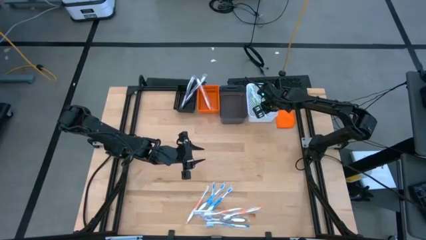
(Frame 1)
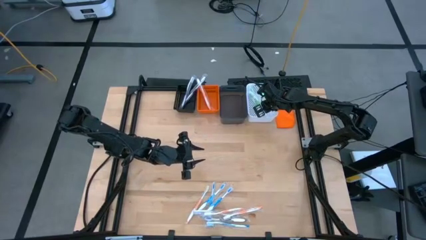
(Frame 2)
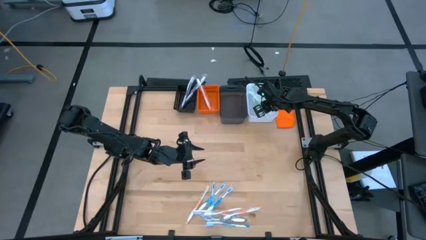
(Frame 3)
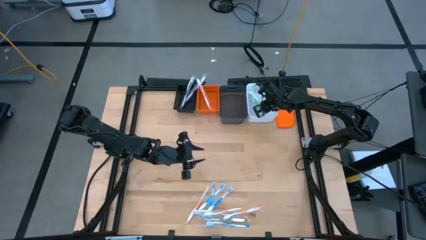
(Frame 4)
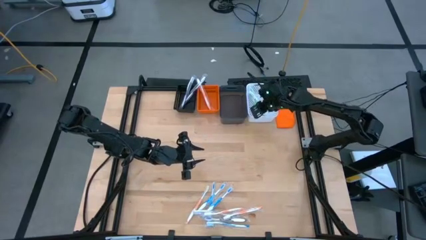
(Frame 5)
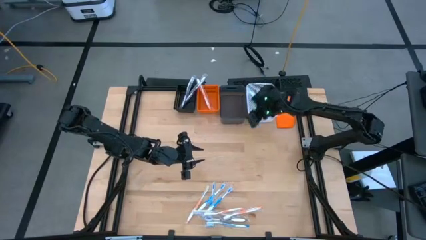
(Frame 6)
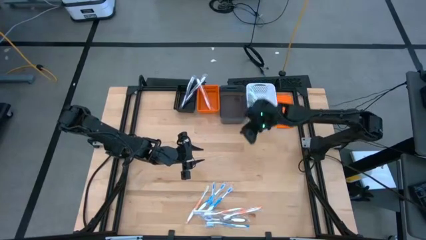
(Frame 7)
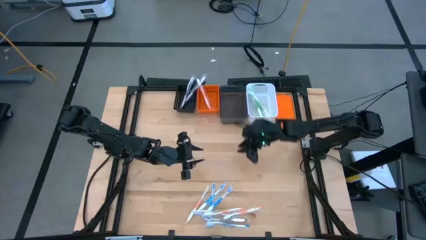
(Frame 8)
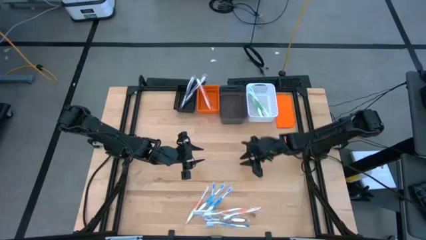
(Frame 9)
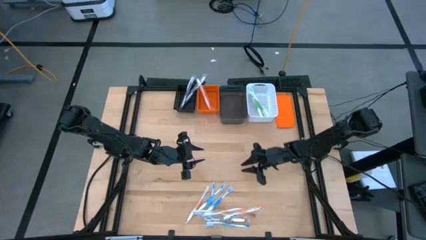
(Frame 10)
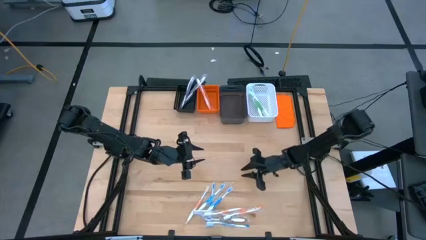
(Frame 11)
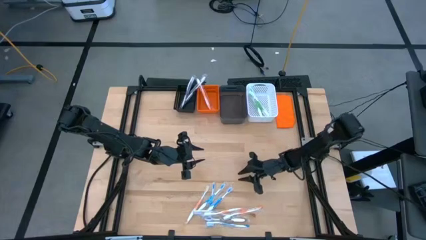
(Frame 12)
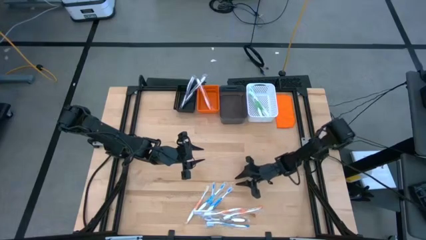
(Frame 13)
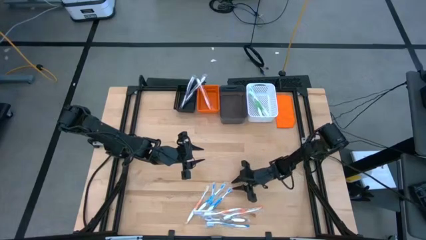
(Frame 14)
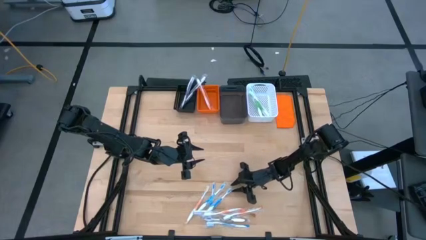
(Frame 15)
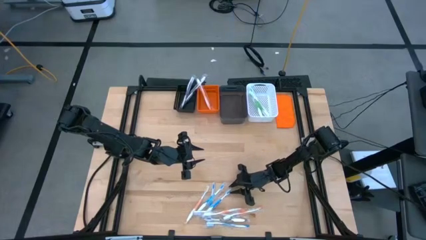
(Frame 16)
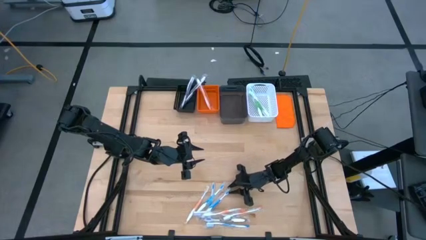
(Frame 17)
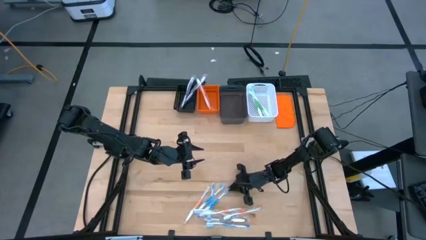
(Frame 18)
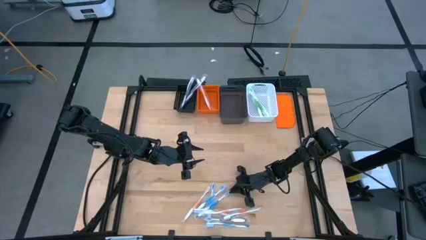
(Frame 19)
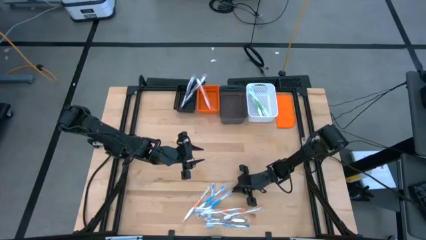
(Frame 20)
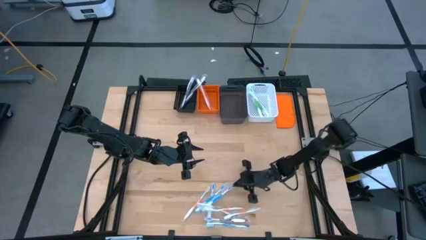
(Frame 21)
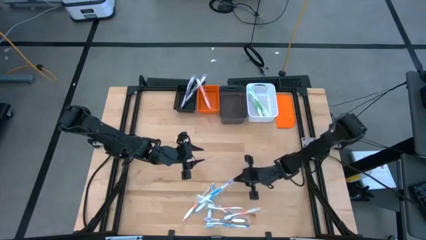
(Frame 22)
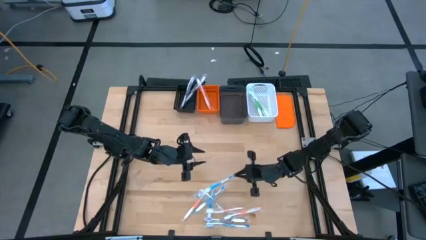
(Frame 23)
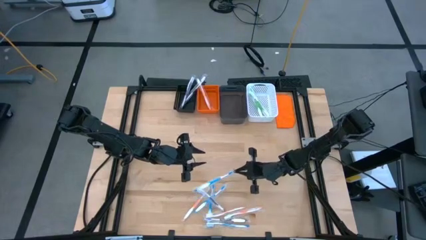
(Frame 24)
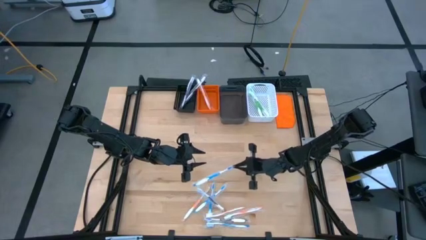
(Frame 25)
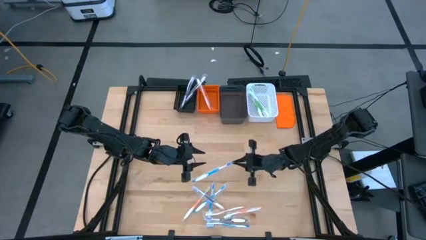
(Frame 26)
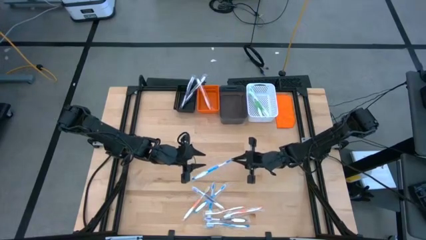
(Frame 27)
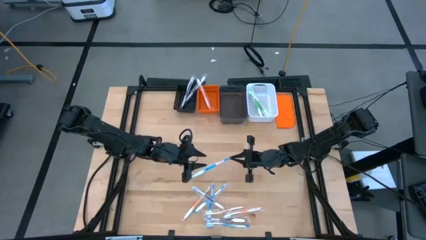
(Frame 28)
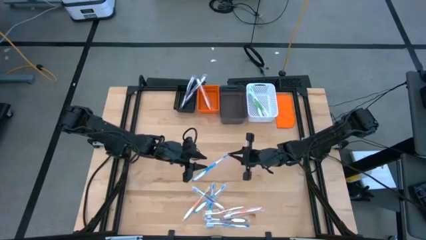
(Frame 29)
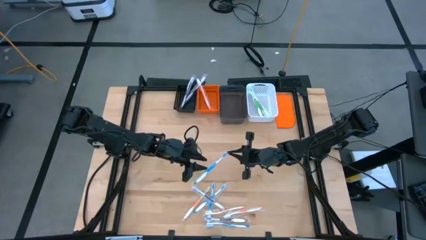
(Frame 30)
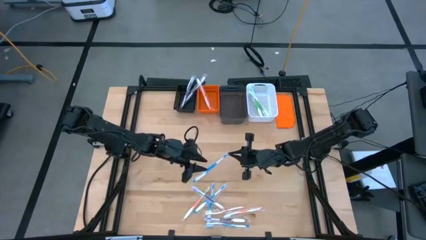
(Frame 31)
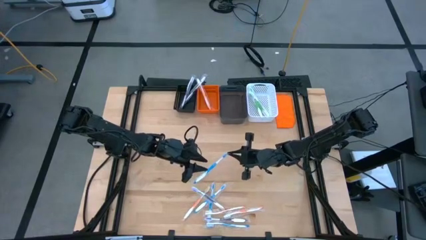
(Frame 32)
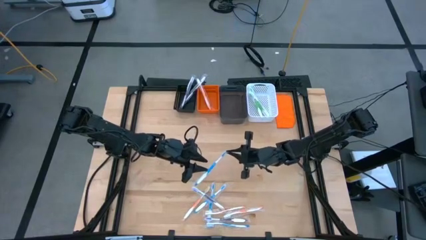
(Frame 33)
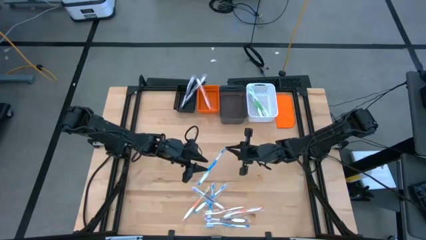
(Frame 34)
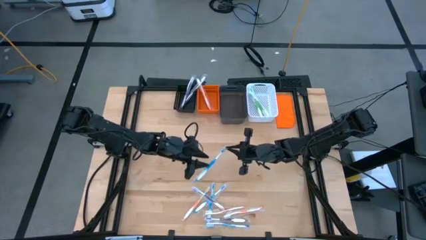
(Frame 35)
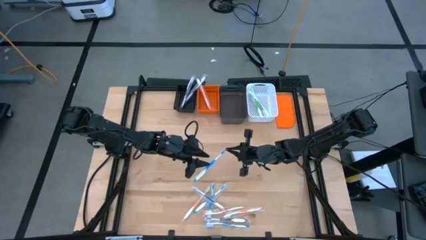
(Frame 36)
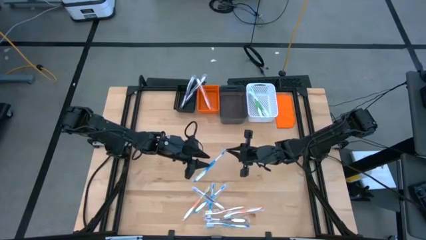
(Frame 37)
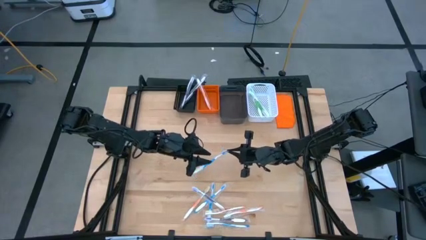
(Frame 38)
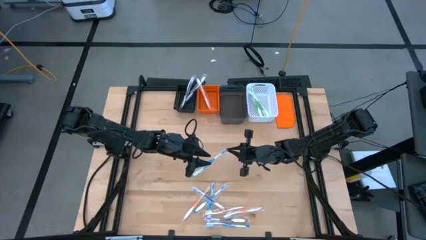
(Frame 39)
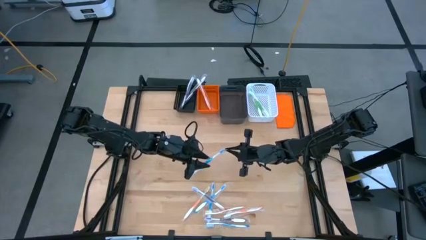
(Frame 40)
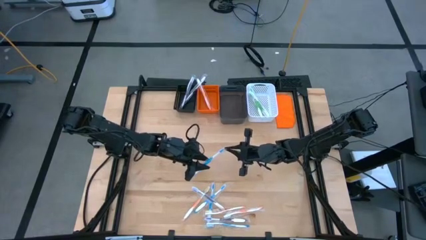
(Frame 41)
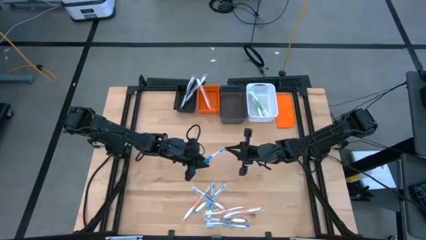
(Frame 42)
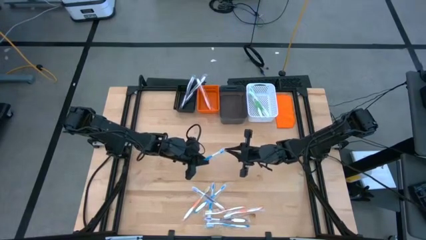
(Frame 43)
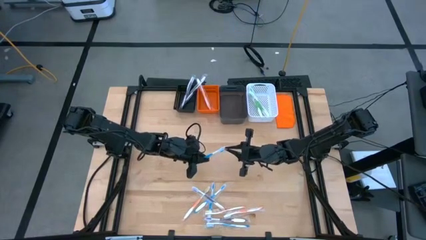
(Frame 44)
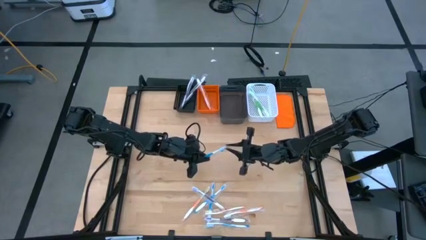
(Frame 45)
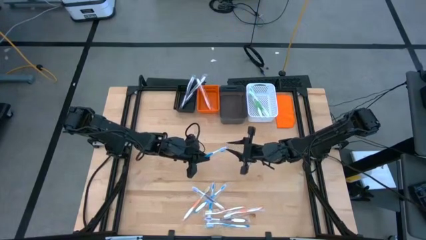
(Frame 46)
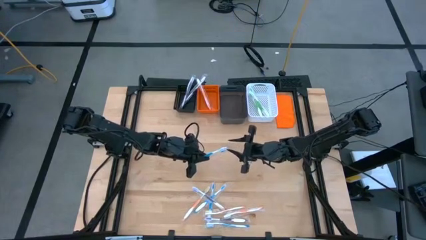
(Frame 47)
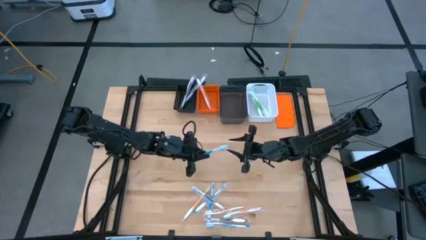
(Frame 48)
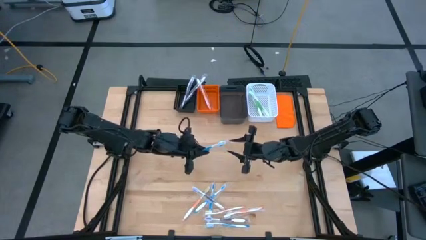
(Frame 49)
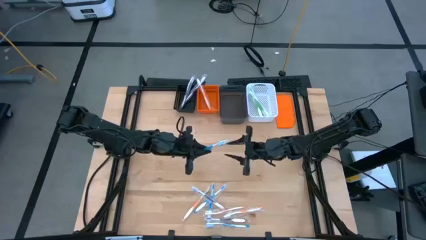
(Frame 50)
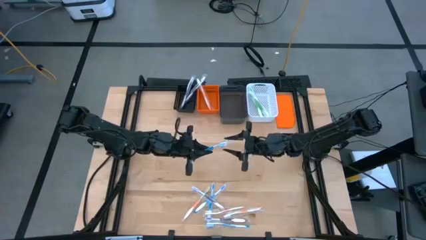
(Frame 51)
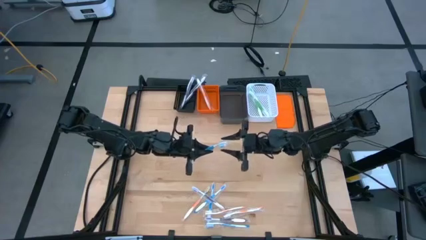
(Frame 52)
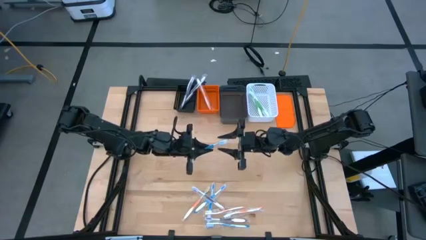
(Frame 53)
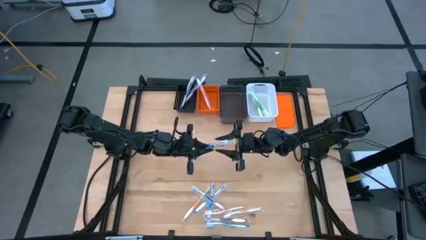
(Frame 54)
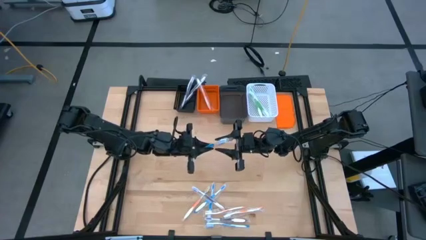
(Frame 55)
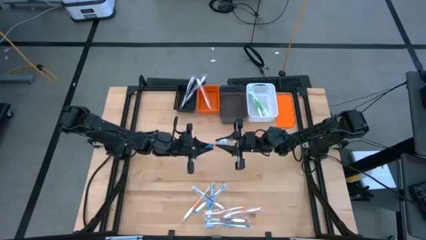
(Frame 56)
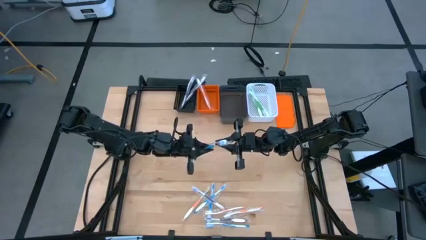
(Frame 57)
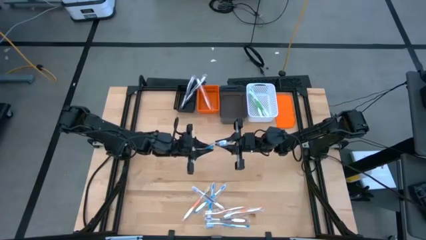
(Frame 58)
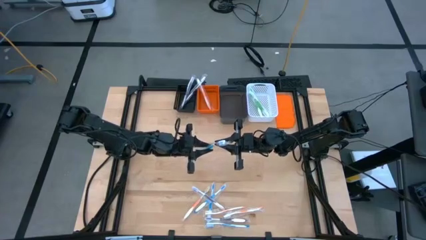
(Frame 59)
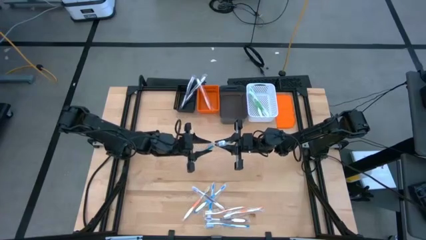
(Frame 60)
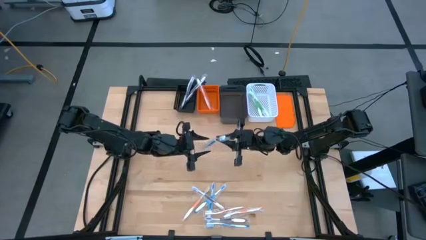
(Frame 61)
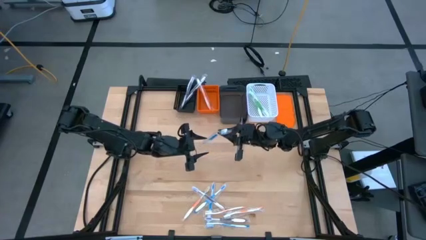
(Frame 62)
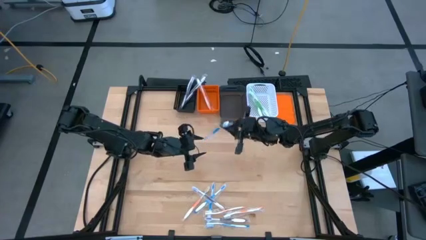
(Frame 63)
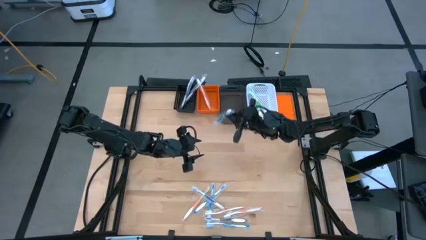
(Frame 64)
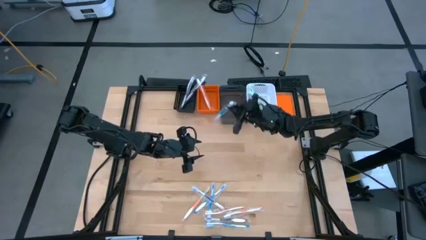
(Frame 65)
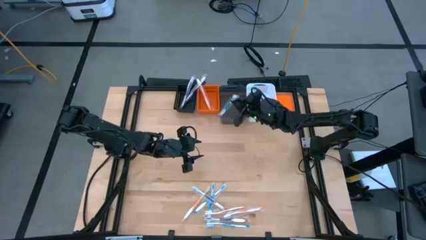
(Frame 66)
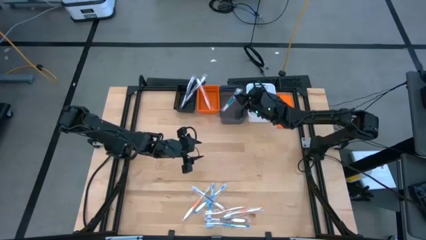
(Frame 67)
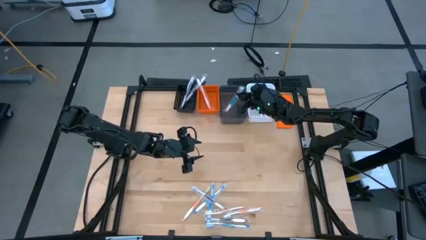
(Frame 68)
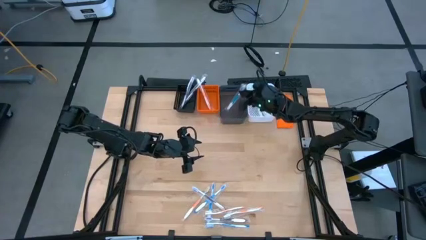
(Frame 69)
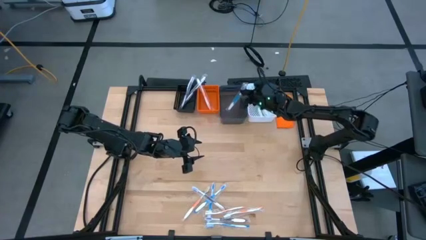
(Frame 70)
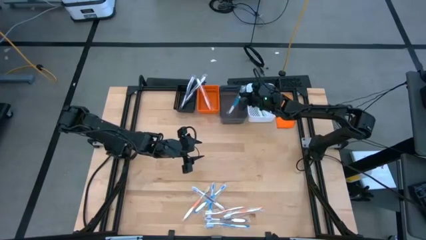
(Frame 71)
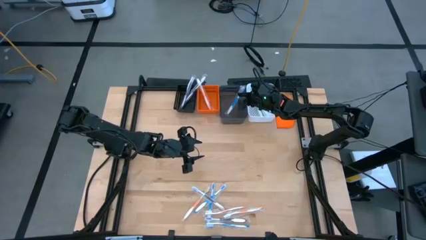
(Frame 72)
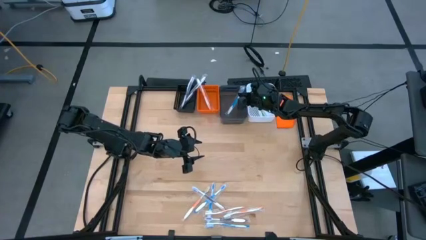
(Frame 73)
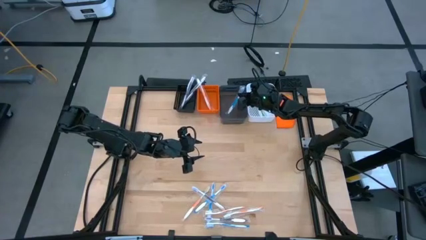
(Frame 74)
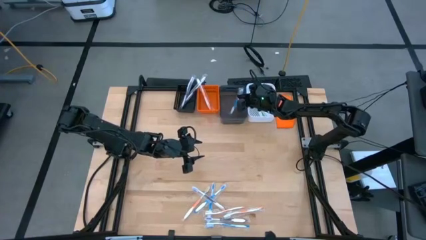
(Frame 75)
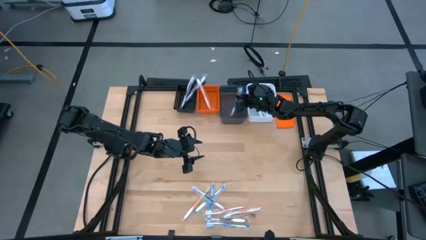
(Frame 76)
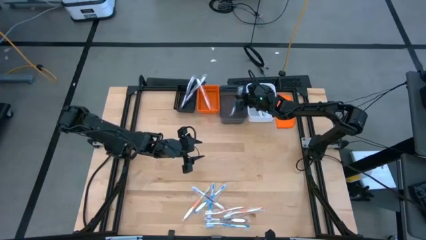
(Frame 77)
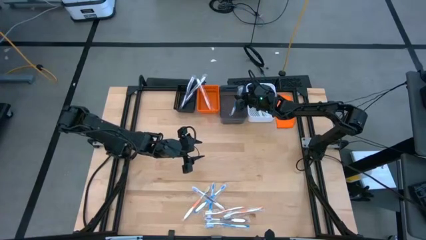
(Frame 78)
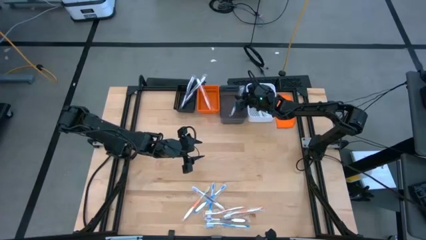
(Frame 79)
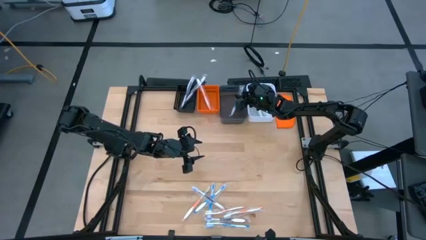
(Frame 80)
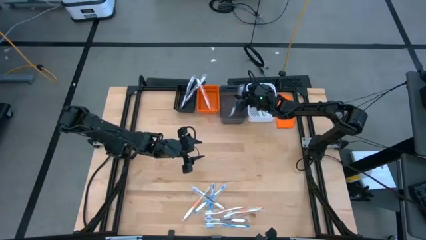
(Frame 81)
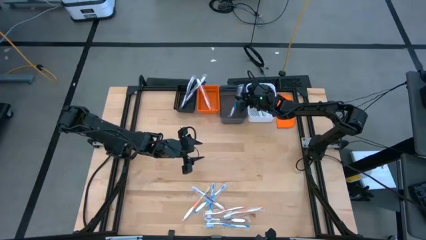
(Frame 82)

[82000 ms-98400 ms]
Task: Pick & Place Toothbrushes
Put the blue toothbrush into the black bin

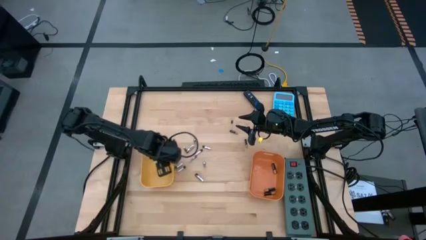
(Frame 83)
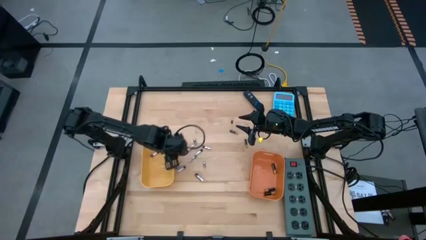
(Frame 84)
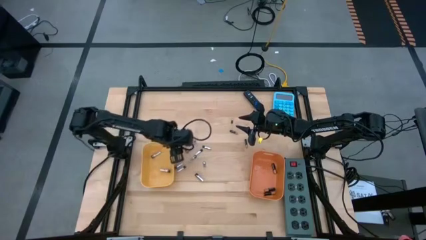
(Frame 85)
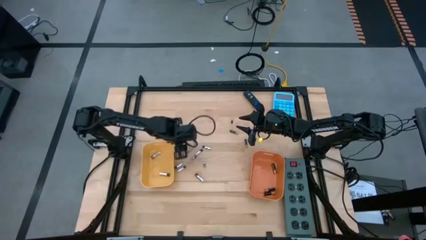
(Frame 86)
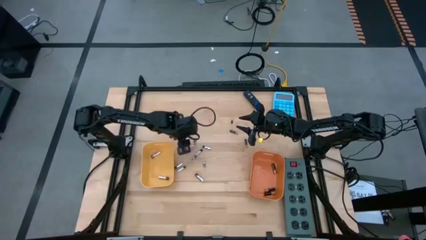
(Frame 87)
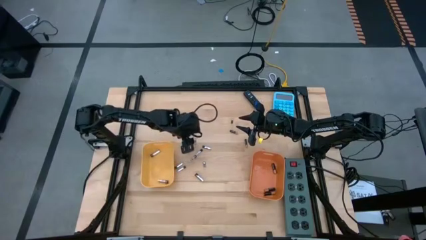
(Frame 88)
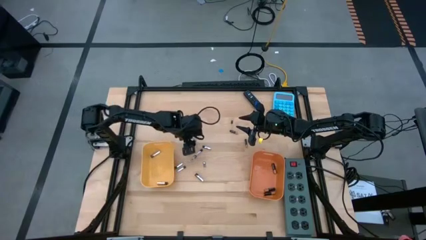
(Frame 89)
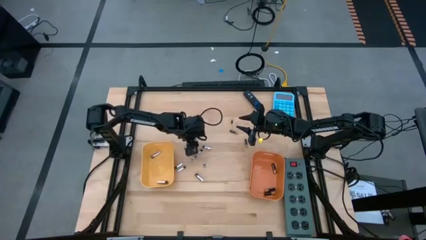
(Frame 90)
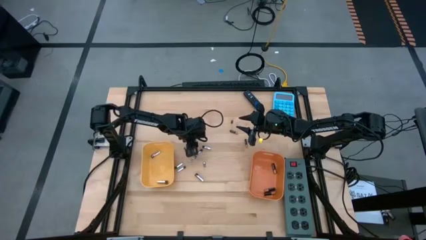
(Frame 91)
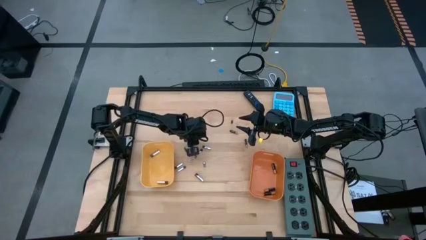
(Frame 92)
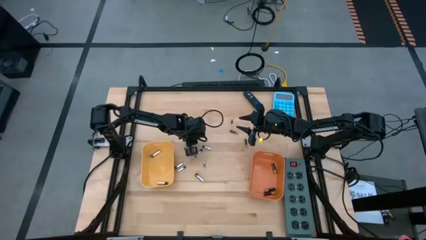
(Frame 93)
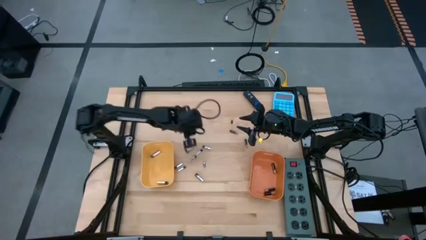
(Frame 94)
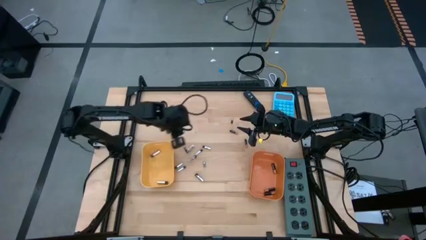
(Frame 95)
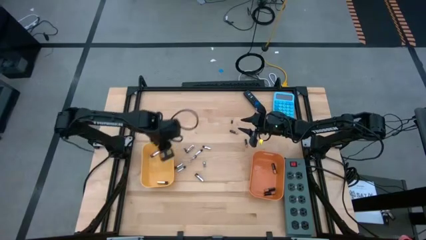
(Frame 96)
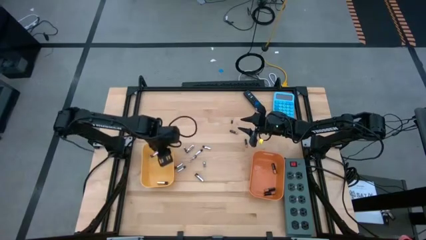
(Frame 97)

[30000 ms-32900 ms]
Task: Sort batteries
Put the silver battery into the yellow bin
